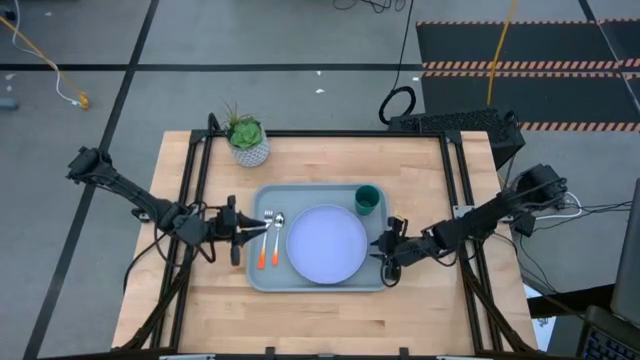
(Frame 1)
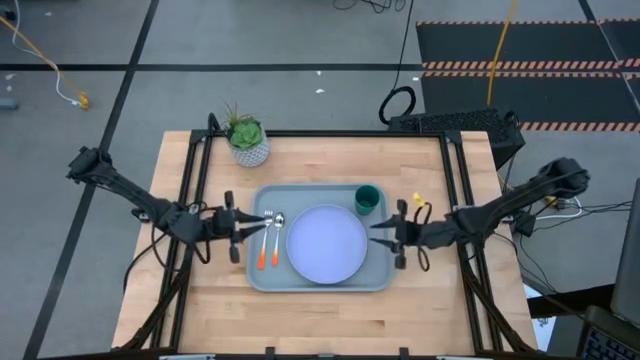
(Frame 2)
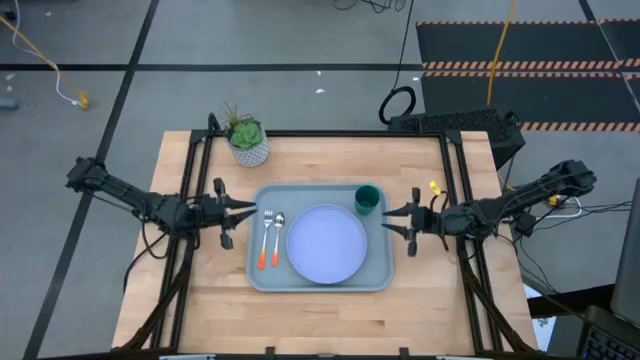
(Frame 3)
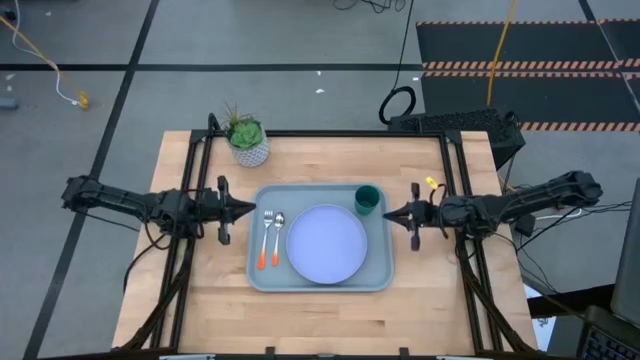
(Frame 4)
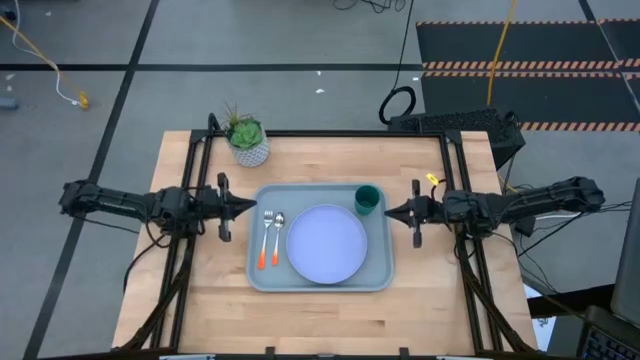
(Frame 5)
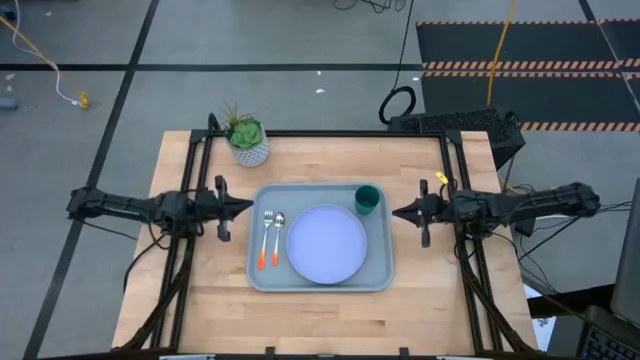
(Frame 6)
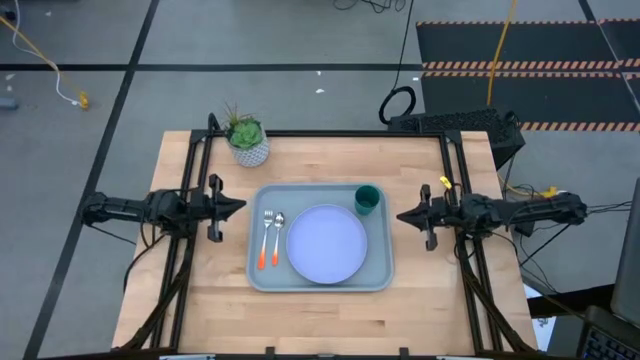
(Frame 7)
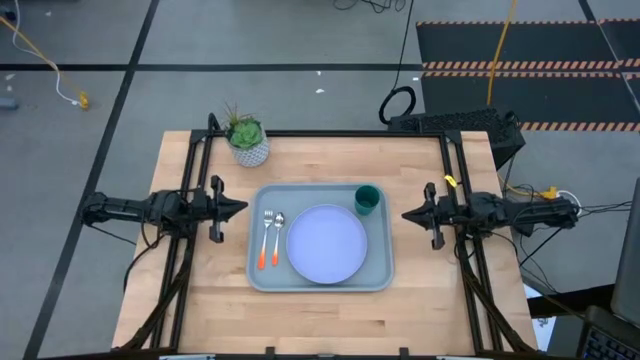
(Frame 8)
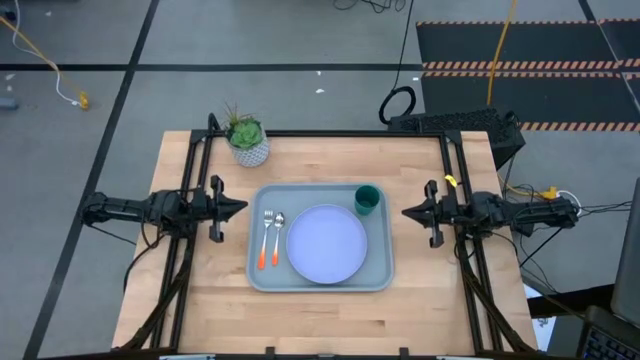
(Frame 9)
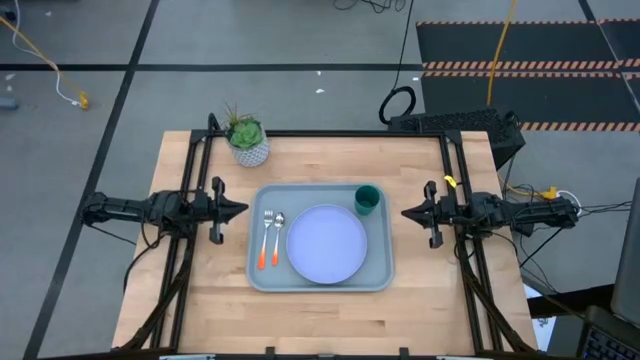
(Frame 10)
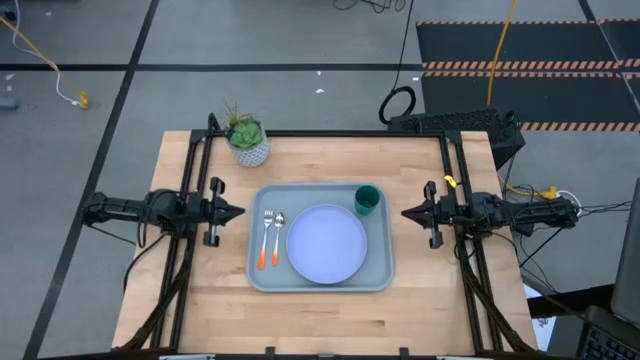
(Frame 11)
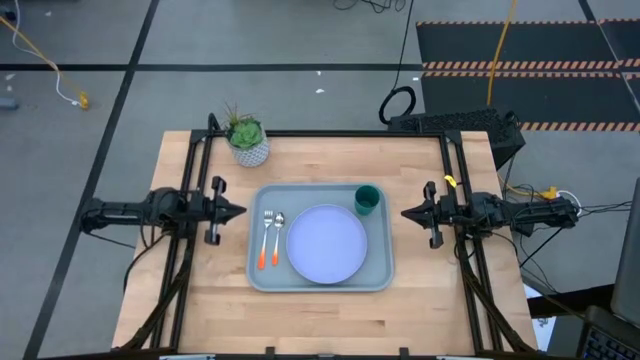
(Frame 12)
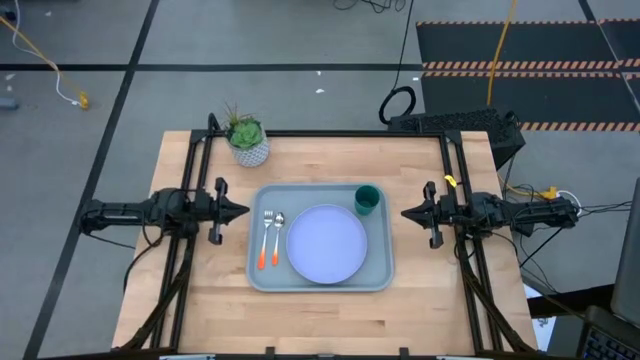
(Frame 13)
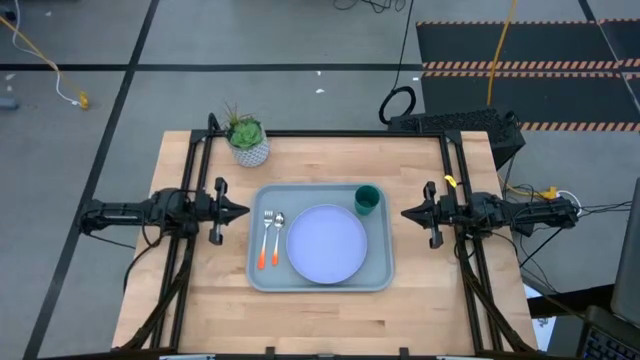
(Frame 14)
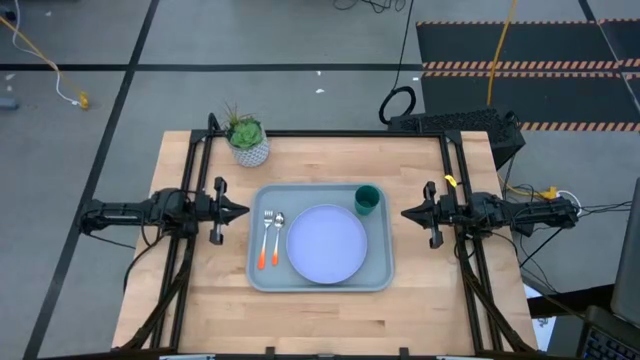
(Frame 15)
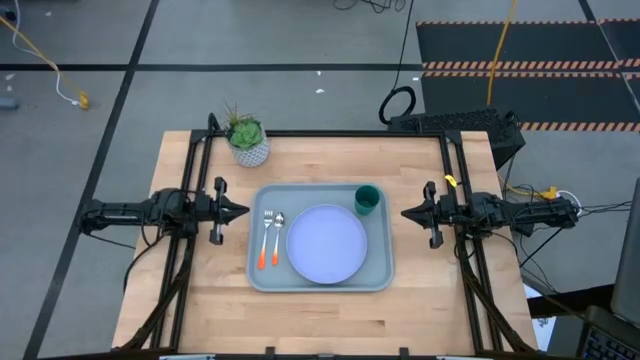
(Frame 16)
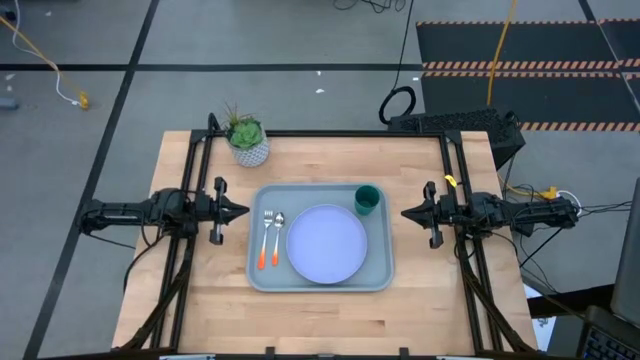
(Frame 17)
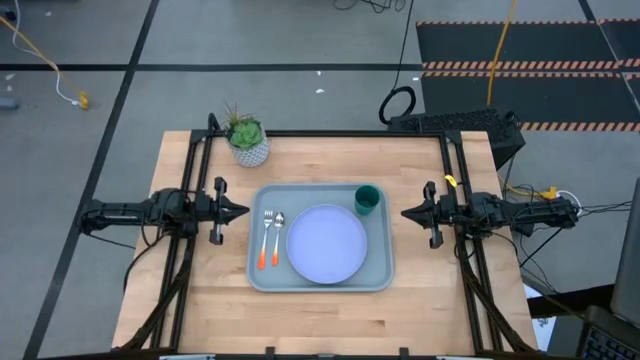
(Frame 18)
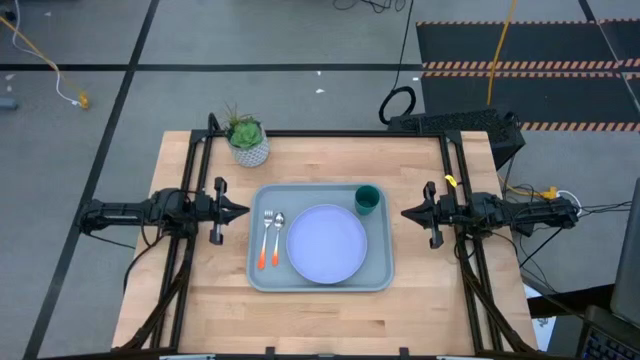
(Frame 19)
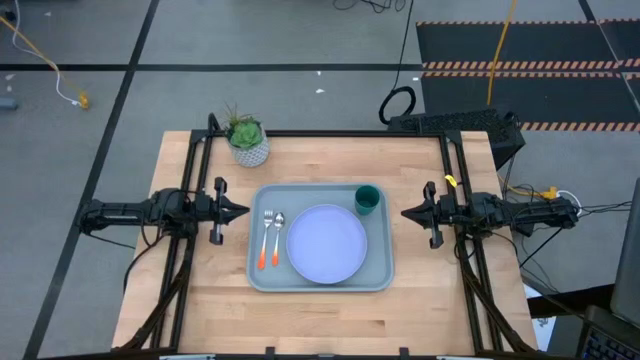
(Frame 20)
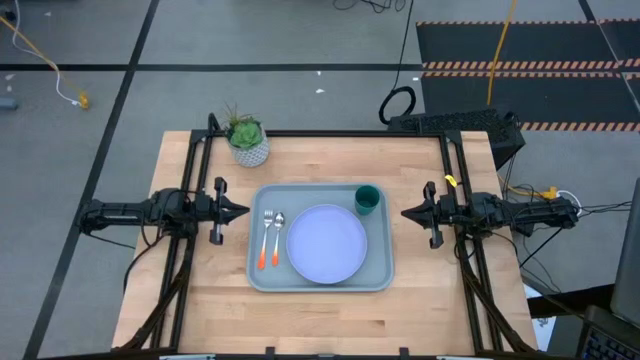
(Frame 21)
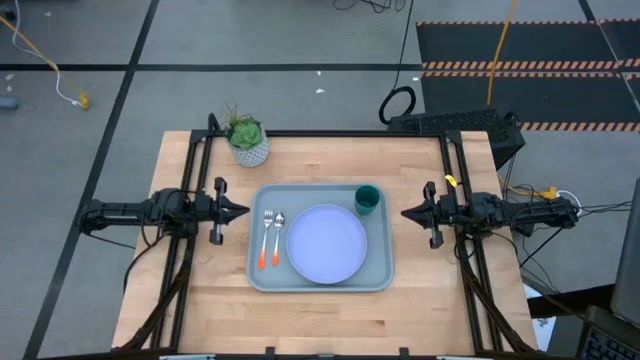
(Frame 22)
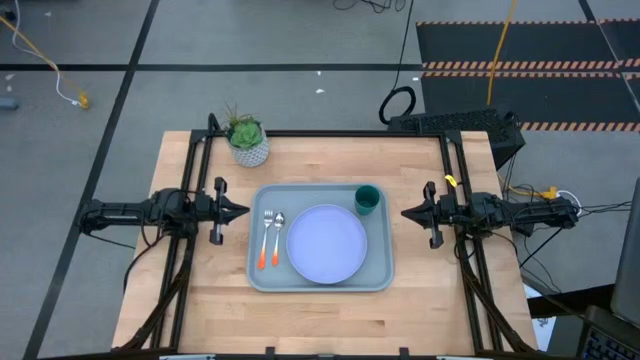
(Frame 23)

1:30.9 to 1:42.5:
Task: Pick and place plate/cup/fork/spoon on tray
Return to Home Position

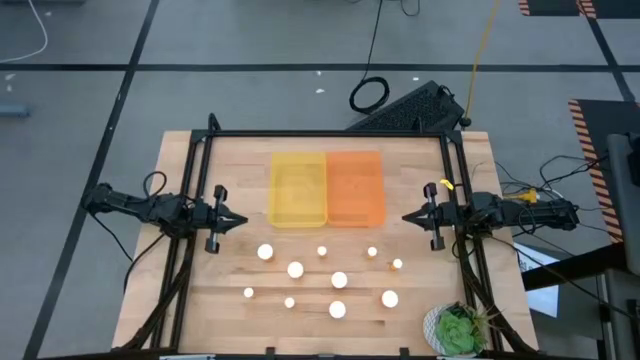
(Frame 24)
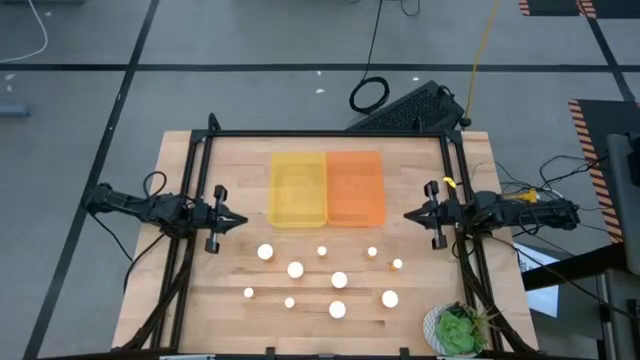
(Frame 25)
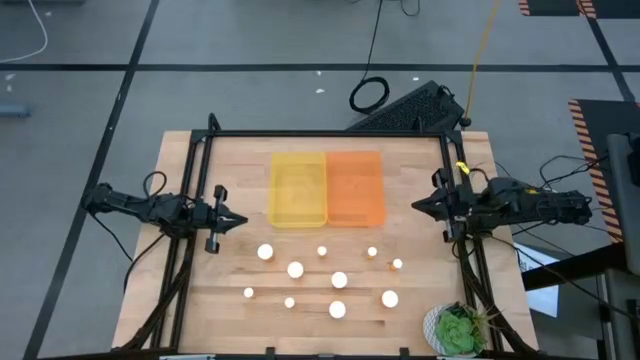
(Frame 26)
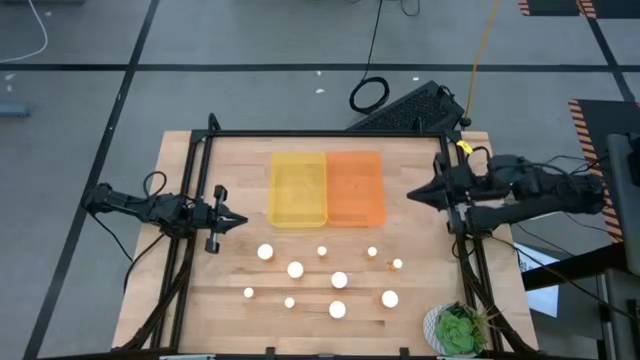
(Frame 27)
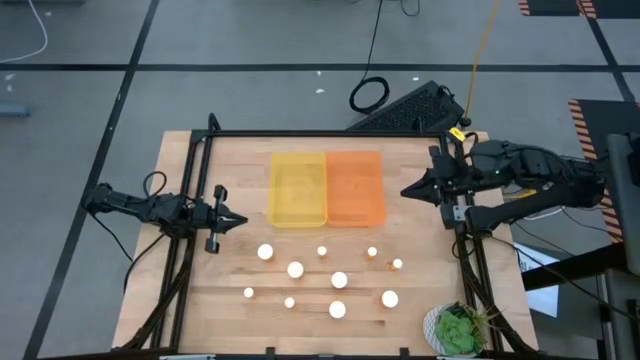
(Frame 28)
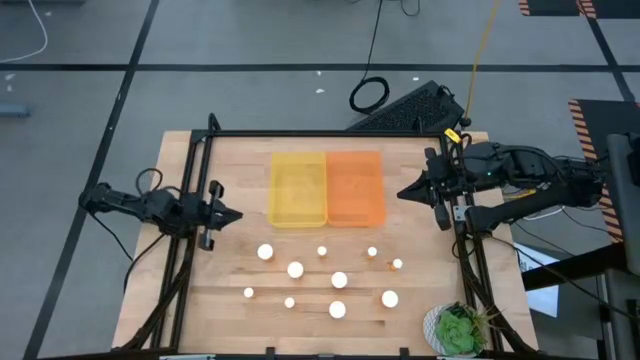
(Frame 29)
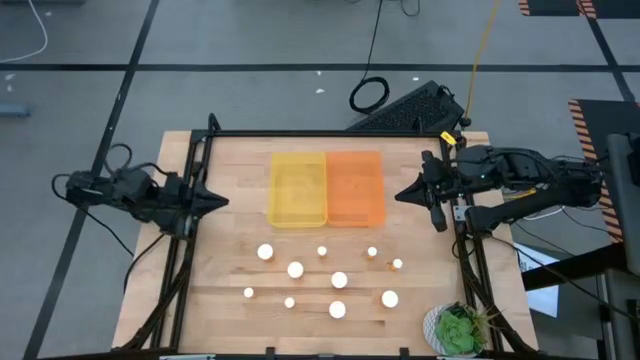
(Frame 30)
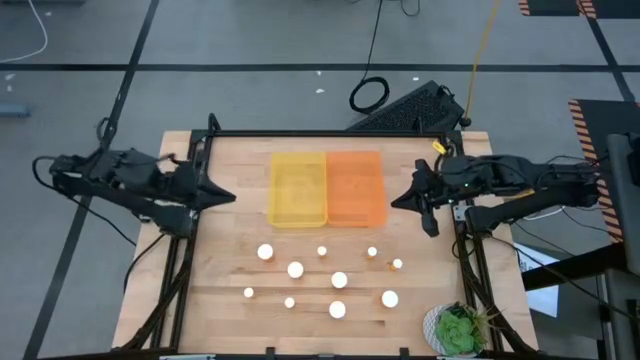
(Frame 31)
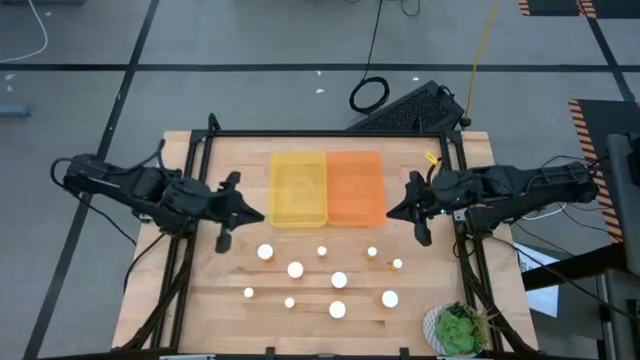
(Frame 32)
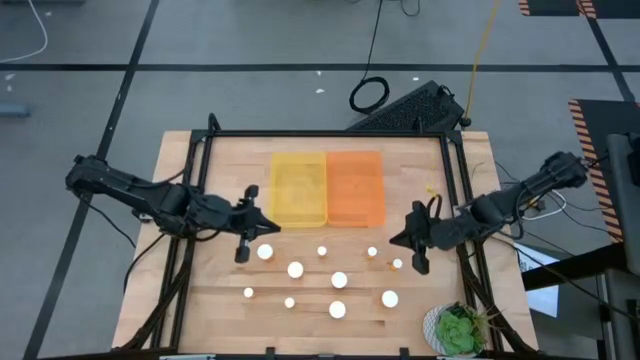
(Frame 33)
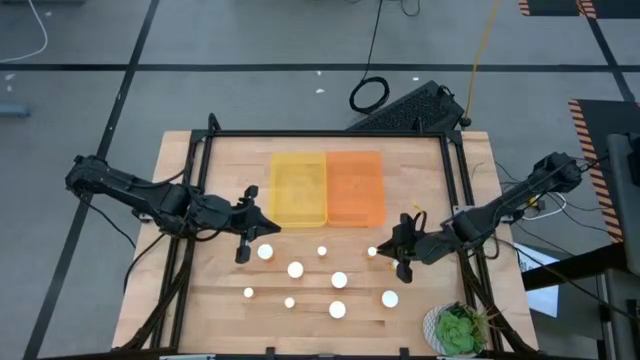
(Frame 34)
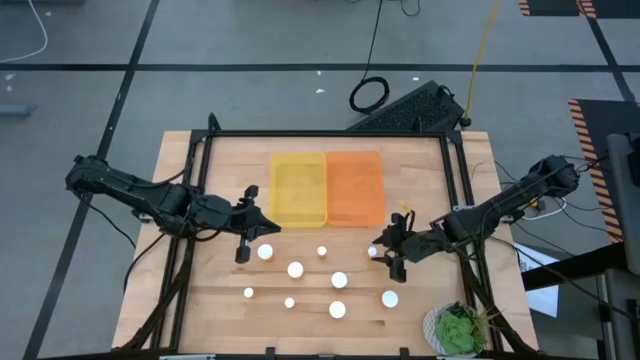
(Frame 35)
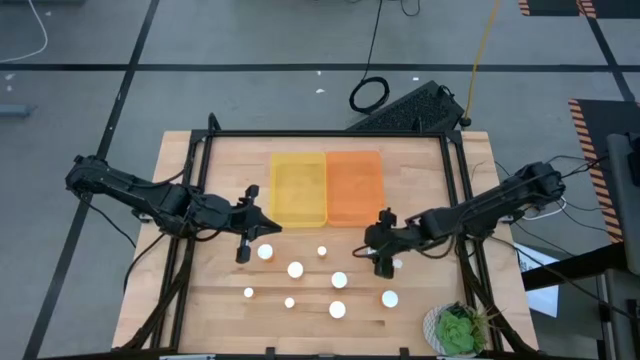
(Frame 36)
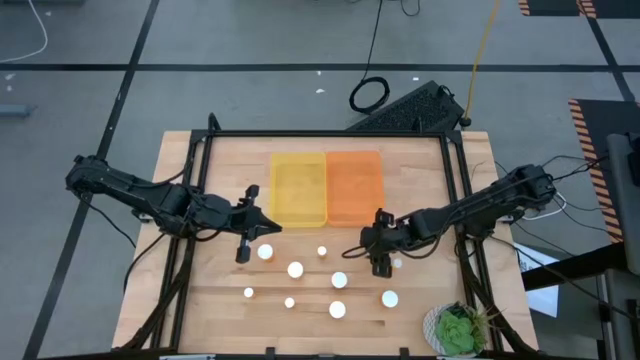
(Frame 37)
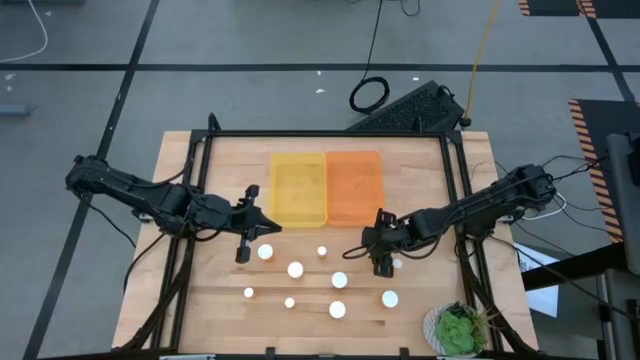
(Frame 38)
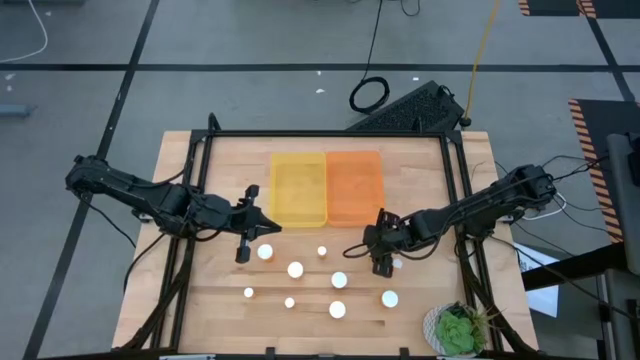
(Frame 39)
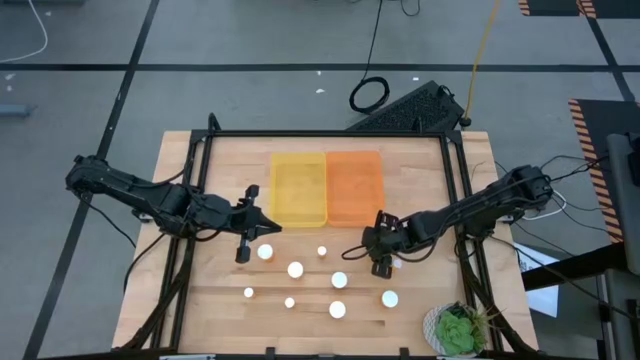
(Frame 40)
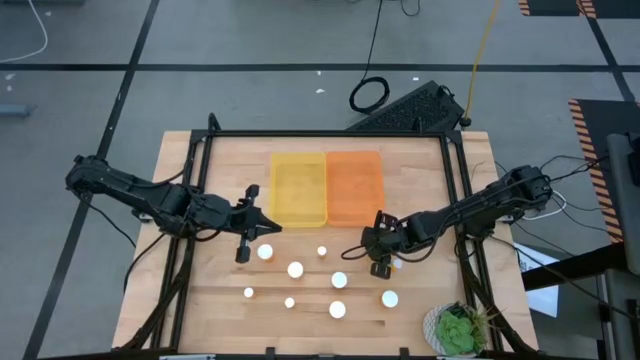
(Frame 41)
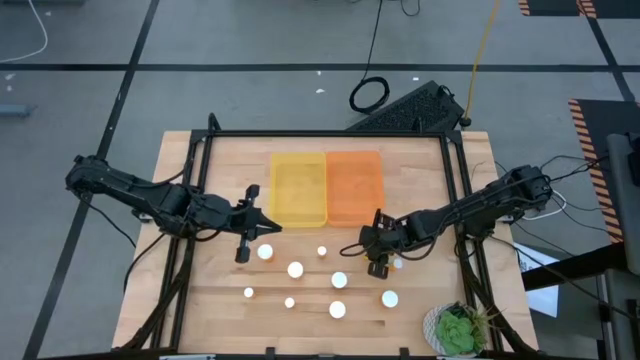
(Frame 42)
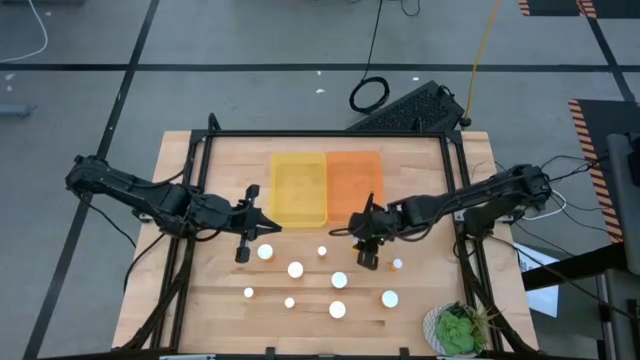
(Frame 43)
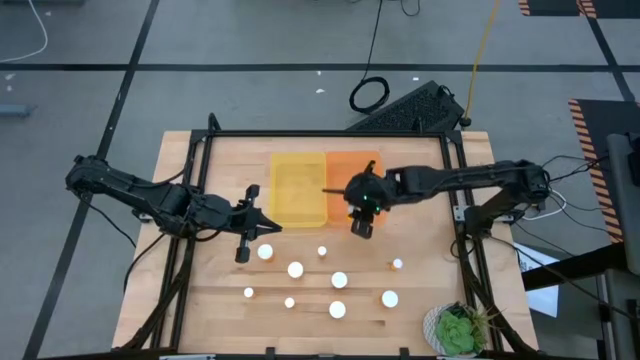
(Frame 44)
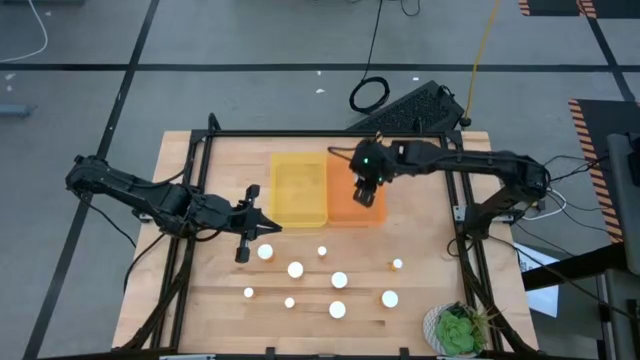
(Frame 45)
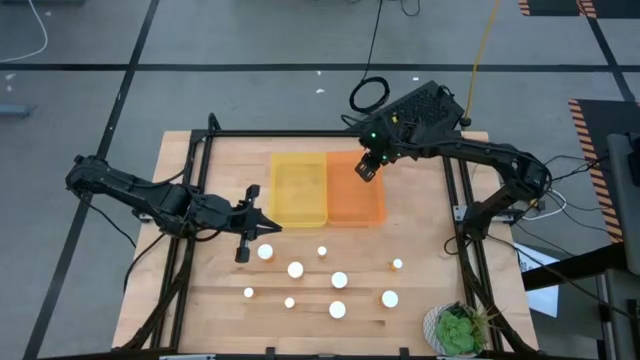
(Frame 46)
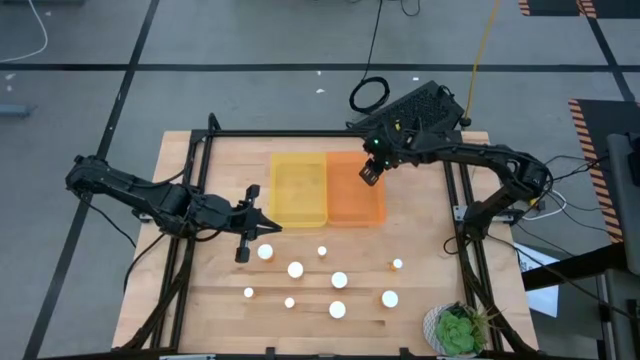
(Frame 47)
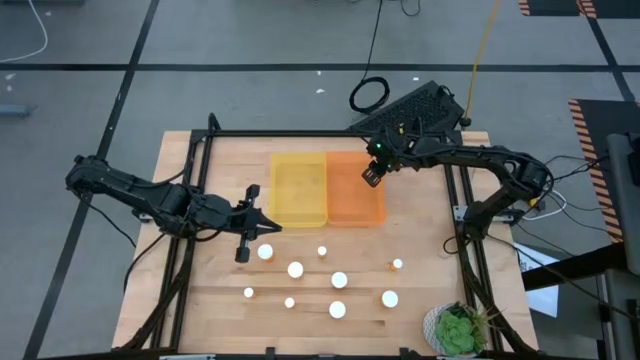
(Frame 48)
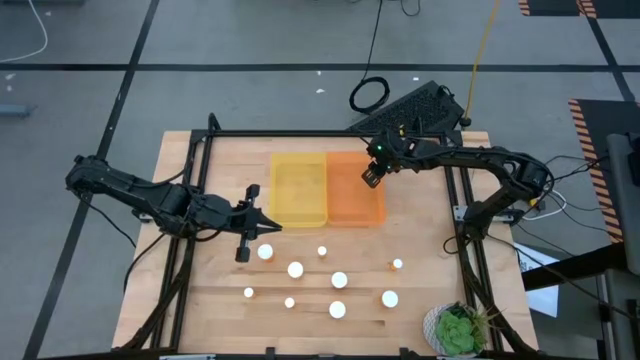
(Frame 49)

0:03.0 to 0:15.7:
Task: Pick and place medicine bottles into bin by pill shape (circle, oval)
Put the small orange pill bottle into the orange bin
